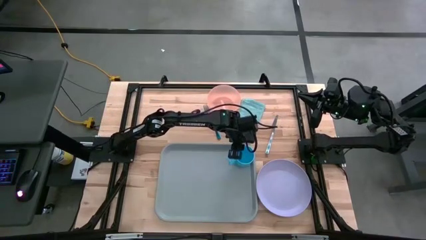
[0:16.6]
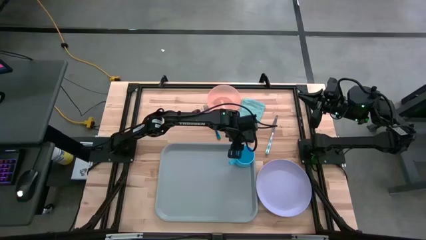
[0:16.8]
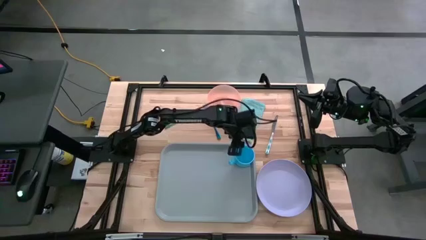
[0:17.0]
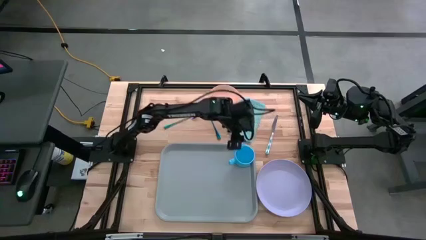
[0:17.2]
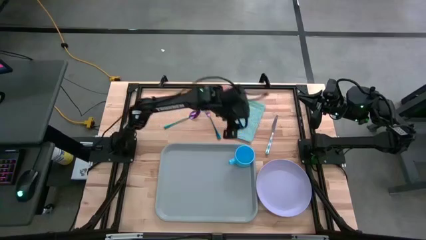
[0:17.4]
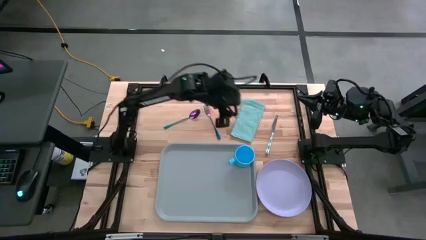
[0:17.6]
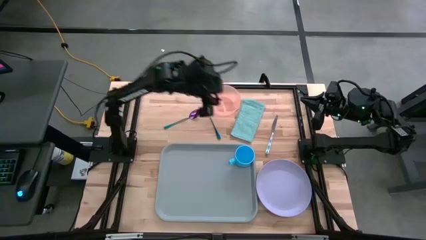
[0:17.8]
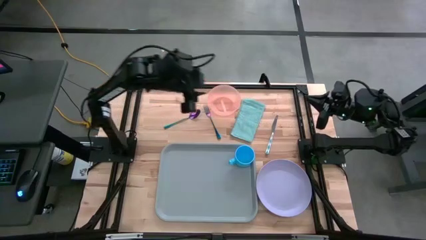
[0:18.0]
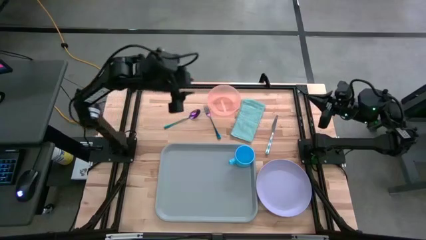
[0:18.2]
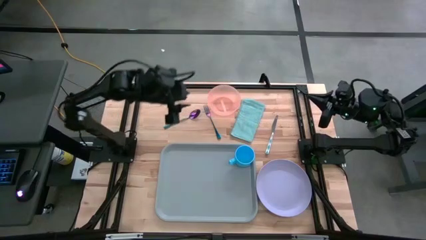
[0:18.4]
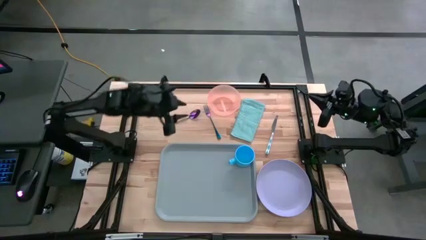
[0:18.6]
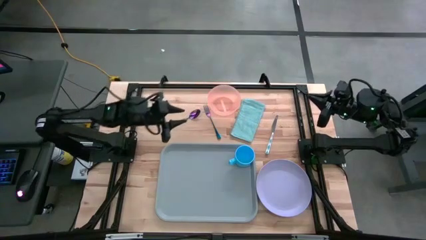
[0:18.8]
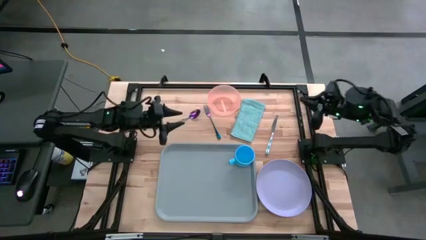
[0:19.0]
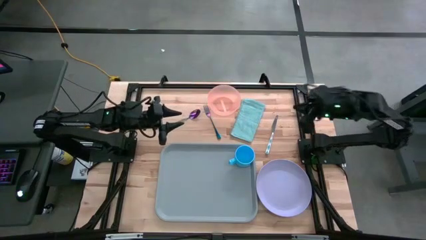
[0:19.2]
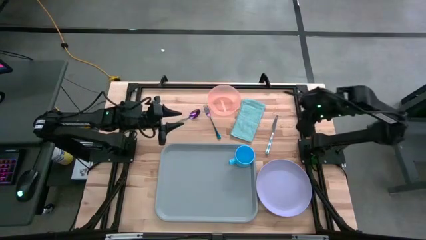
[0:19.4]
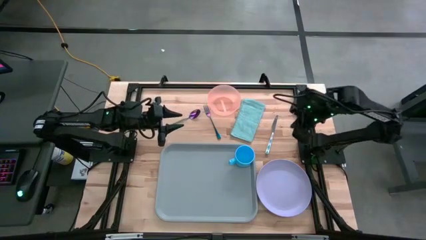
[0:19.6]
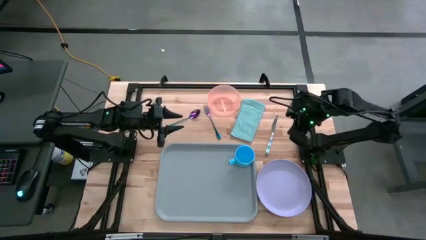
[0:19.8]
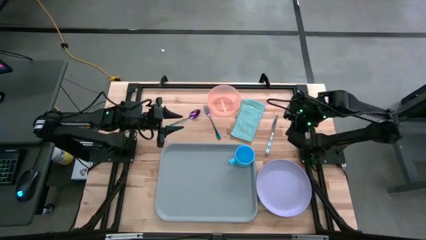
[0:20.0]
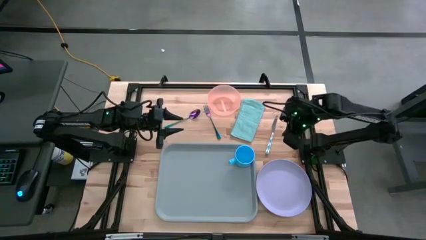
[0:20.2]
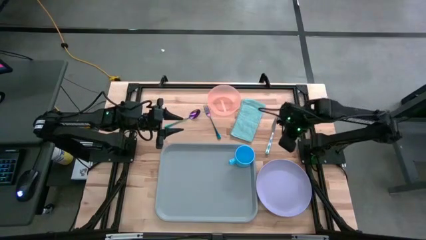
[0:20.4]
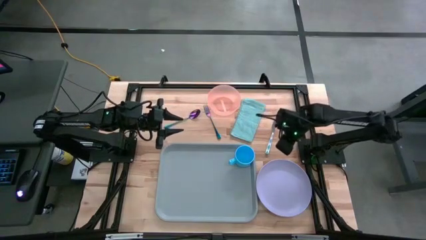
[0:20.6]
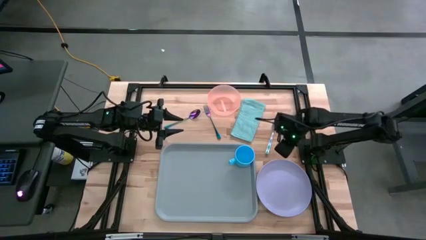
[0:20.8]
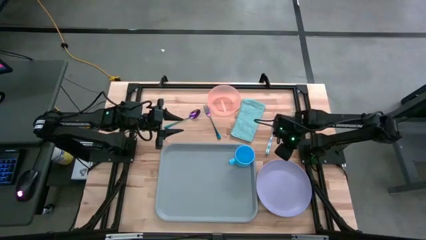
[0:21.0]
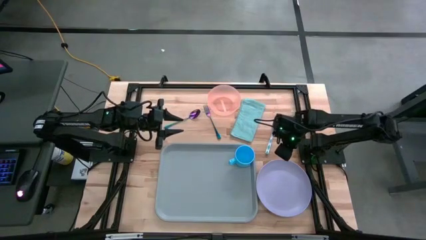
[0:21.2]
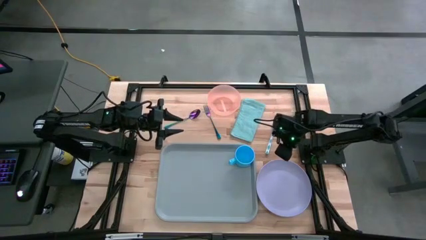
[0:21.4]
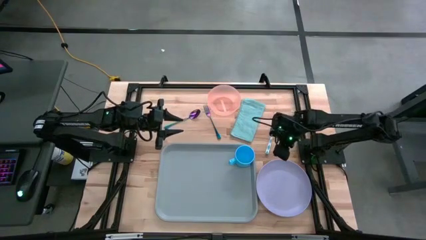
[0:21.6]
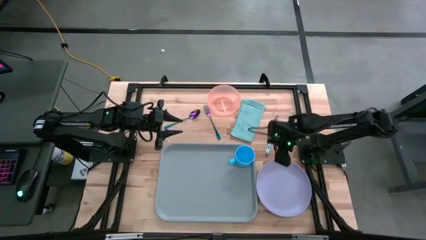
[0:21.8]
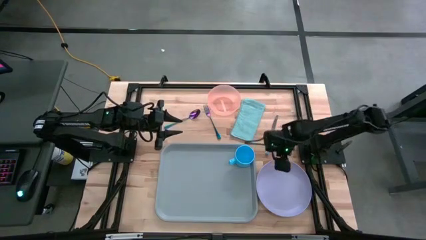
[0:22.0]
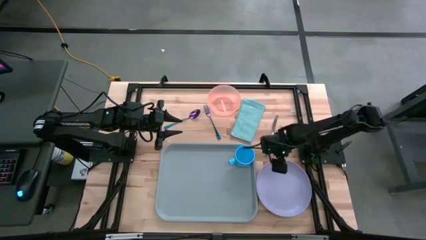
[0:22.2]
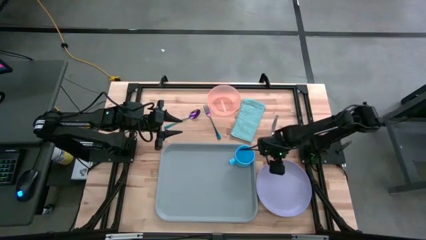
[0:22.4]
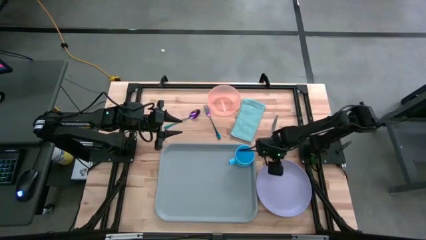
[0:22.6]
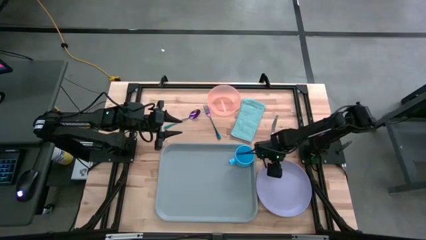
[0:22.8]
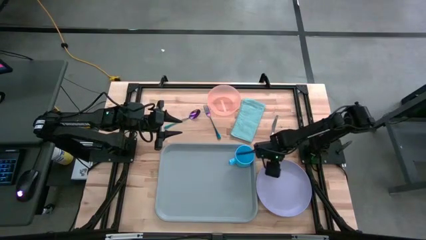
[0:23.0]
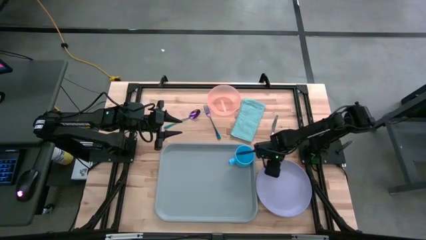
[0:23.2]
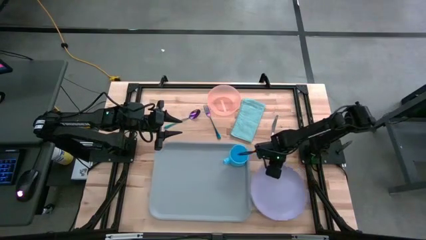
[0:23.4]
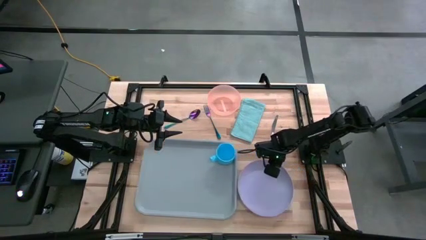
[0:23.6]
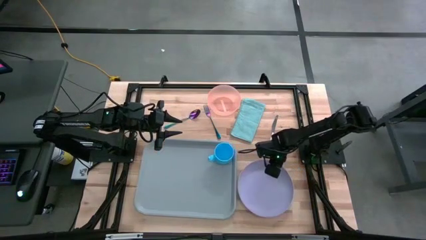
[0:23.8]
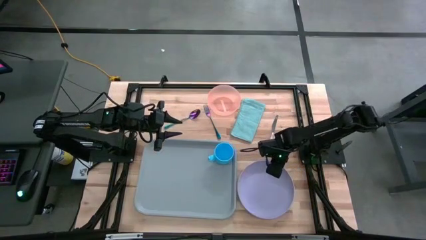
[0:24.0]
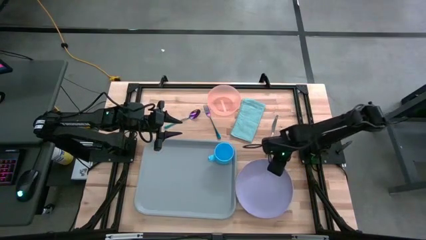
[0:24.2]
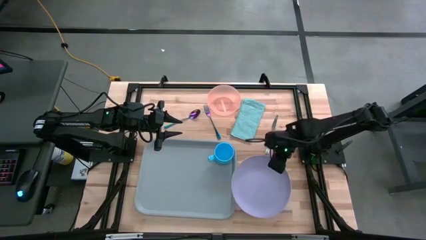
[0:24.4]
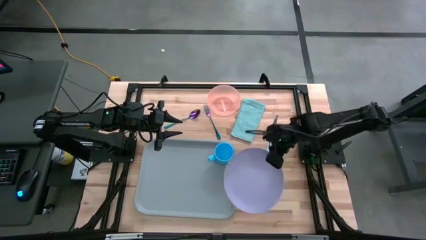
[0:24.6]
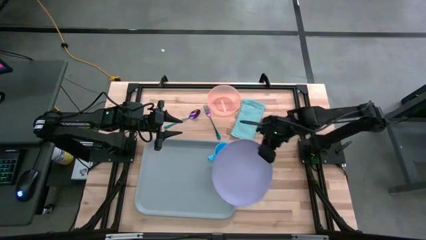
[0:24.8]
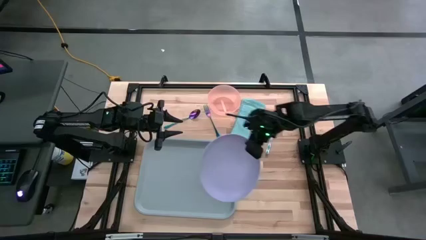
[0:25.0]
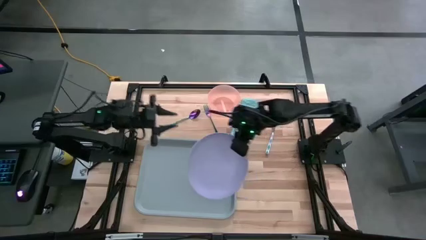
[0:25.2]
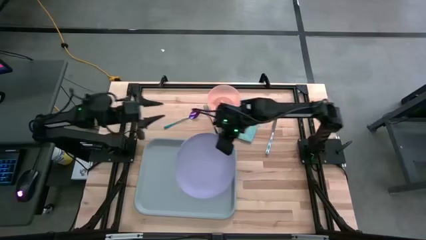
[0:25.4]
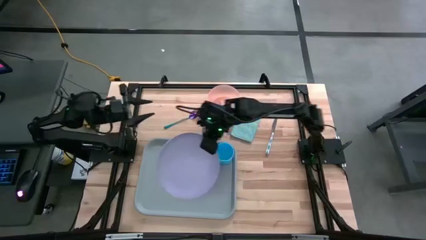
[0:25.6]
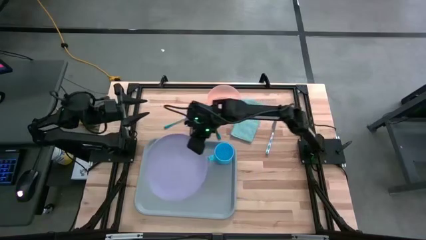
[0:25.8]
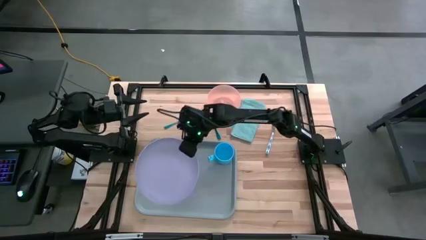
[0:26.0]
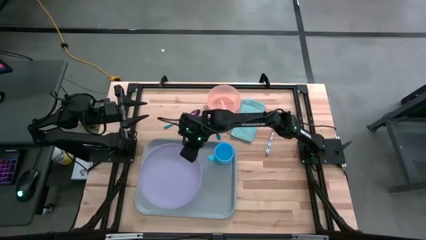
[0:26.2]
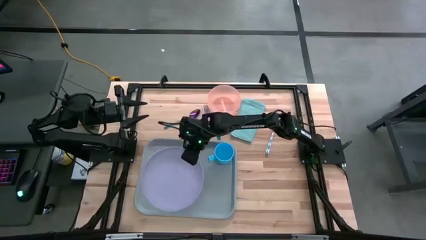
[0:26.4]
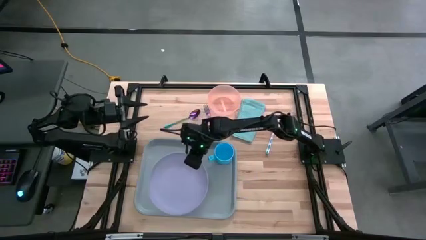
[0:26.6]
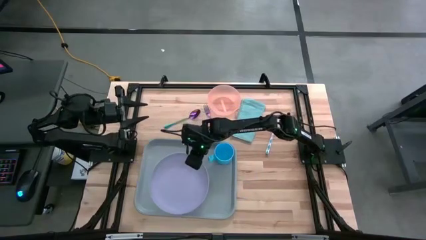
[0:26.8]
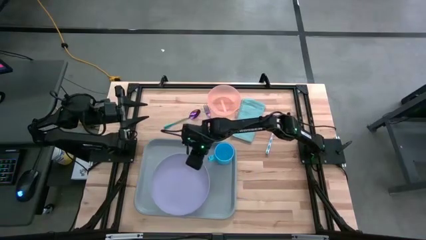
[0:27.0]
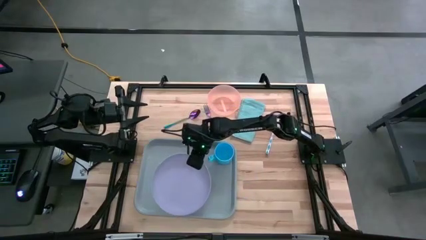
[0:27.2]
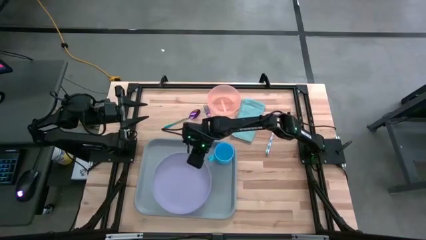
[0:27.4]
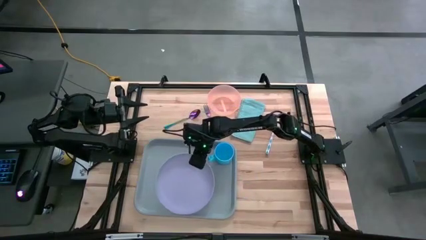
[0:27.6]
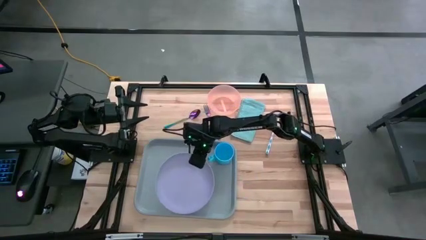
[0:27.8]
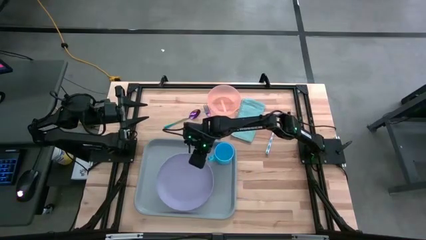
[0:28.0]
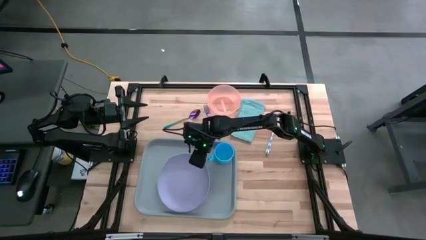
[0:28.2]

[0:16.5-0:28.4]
Task: Set up tray
Put the purple plate on the serving tray to the bottom left of the blue mug
